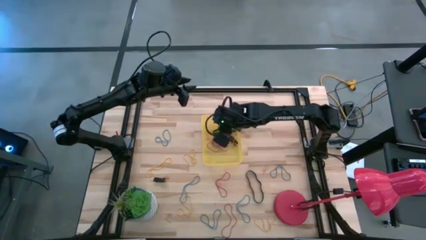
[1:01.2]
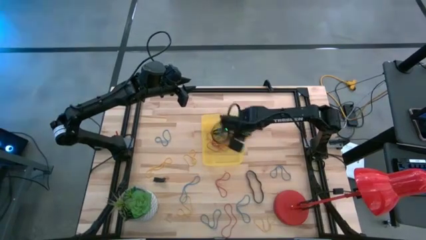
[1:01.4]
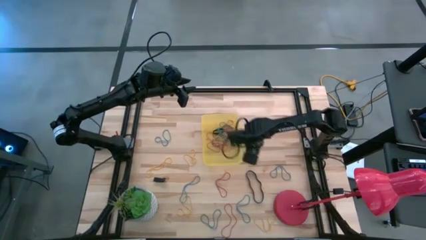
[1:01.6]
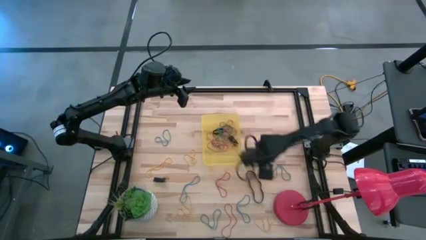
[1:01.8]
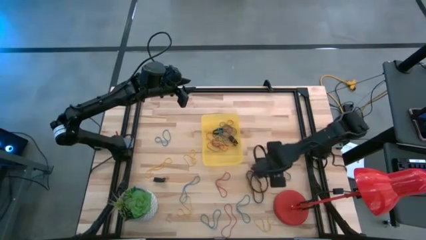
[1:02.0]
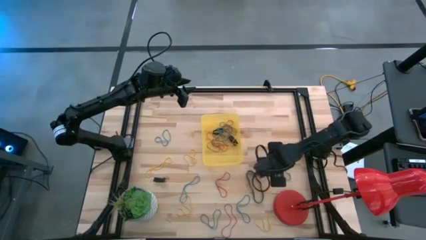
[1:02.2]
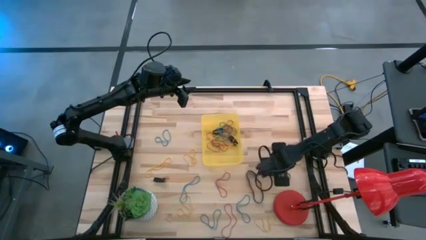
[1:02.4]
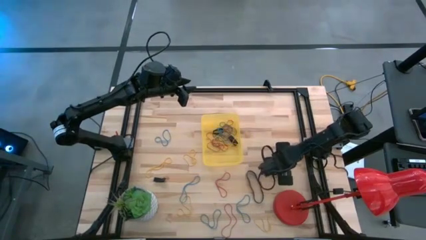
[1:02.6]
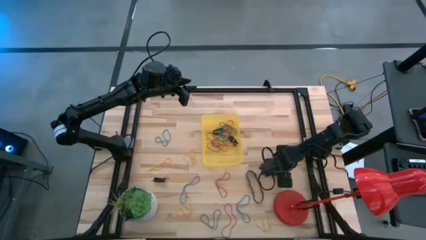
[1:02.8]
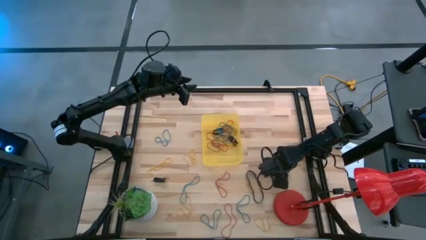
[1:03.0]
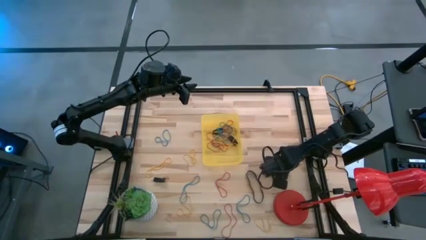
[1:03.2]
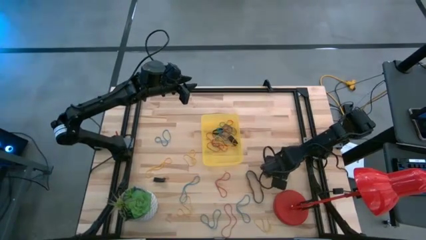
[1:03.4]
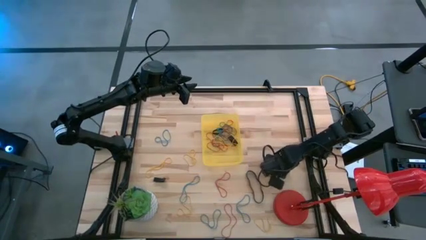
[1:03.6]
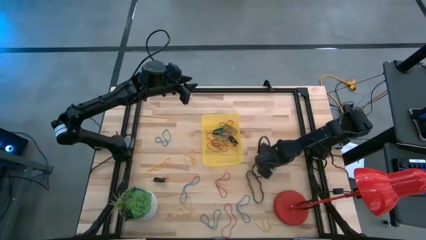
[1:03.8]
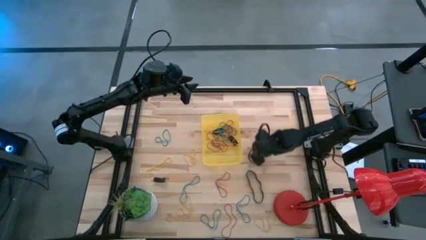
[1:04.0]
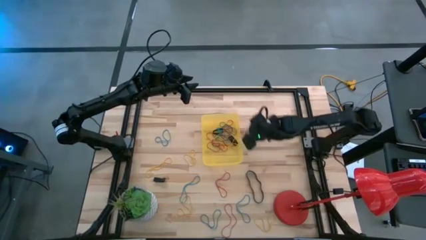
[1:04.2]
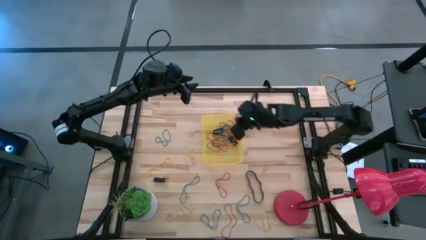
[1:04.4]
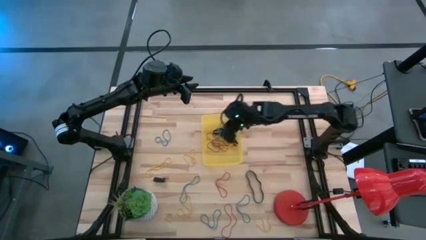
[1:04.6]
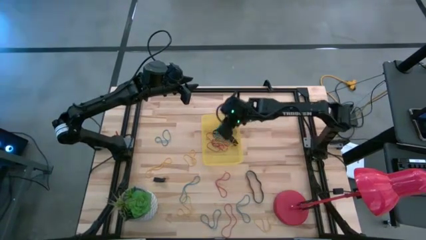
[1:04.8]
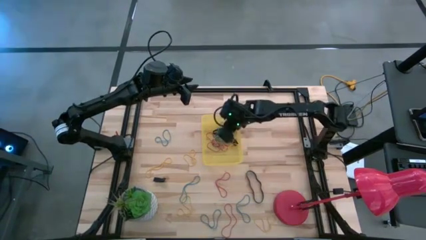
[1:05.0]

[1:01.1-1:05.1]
Task: Pick and place rubber bands into bin
Put the blue rubber band into the yellow bin

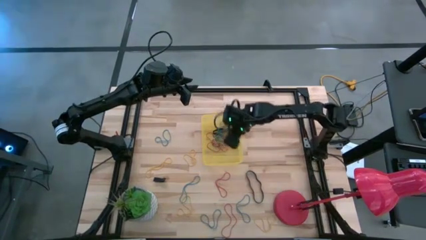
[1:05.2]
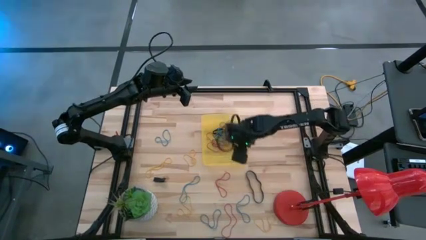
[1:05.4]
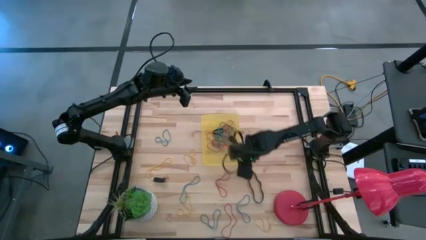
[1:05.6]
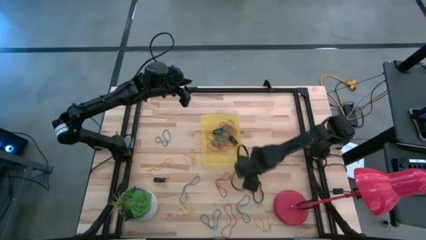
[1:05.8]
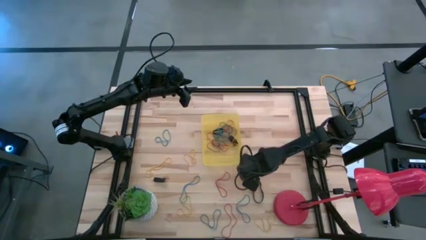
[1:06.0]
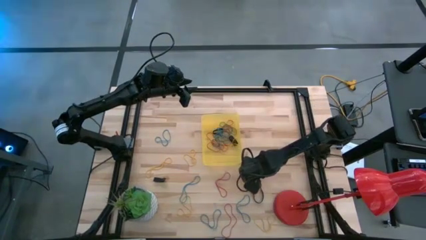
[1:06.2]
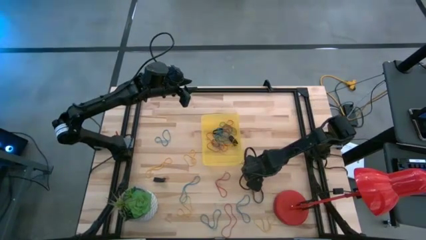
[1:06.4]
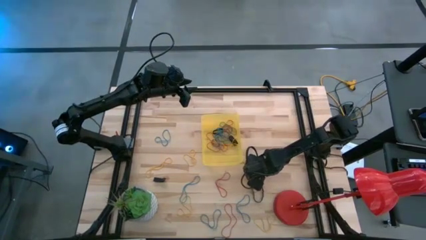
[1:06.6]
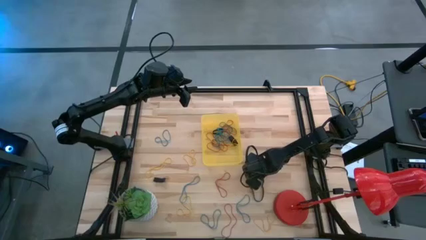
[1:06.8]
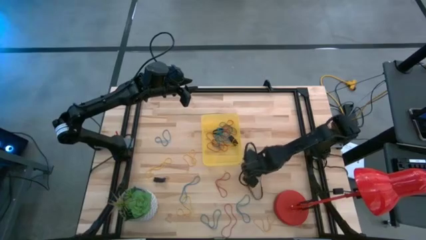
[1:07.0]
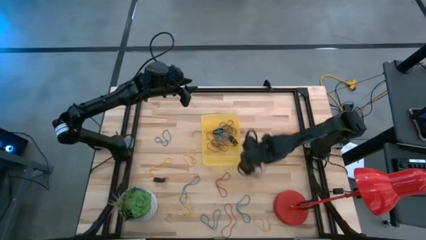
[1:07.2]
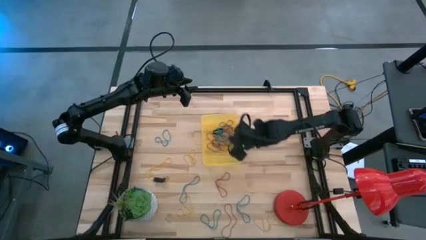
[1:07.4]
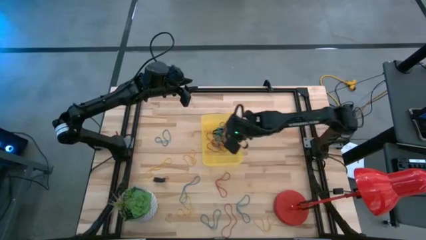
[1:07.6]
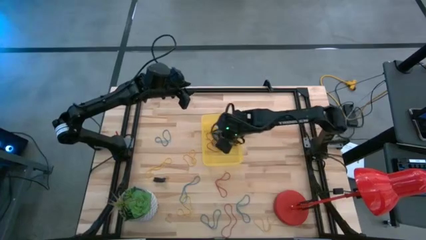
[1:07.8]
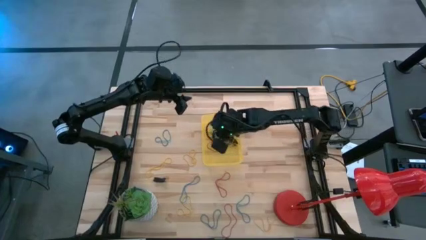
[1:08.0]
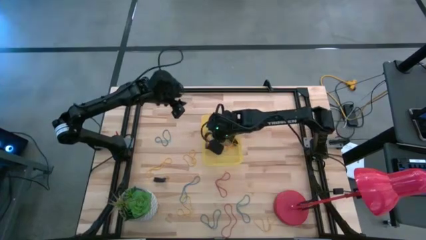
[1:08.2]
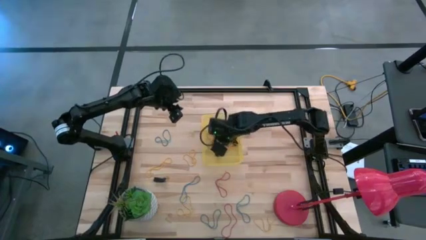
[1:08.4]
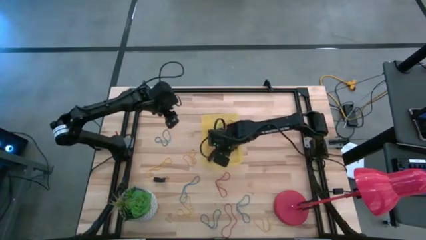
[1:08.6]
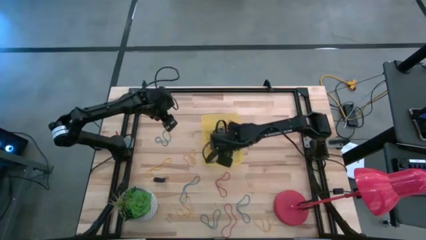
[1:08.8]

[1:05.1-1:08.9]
Put the large black rubber band into the yellow bin

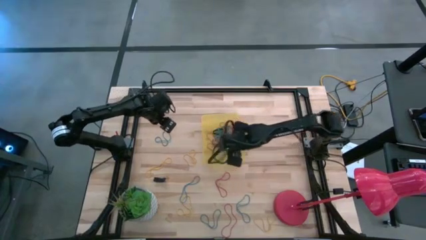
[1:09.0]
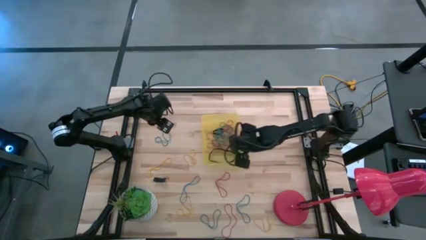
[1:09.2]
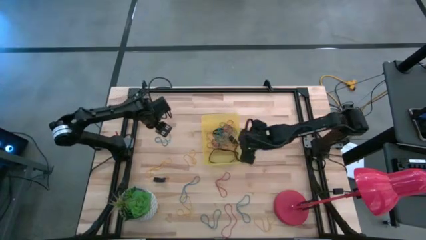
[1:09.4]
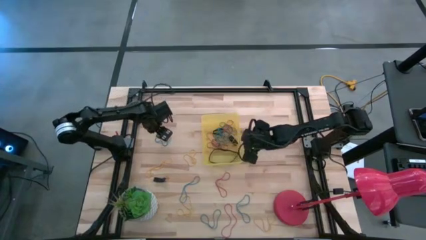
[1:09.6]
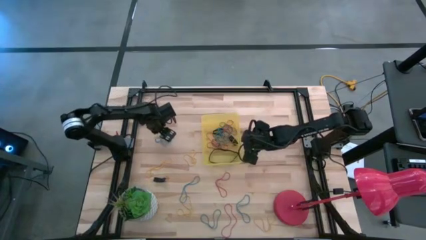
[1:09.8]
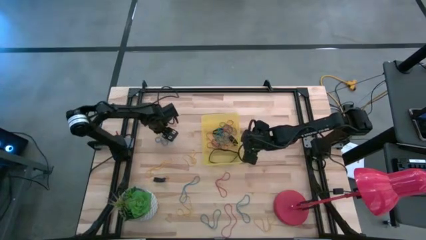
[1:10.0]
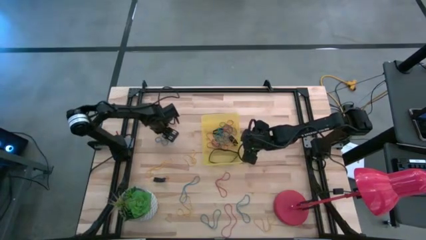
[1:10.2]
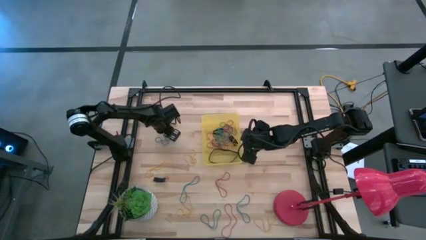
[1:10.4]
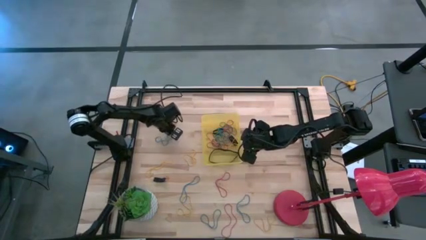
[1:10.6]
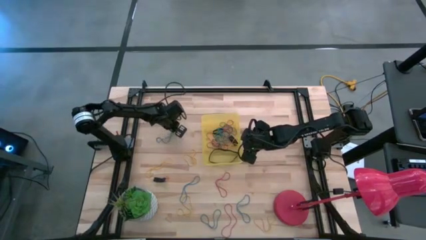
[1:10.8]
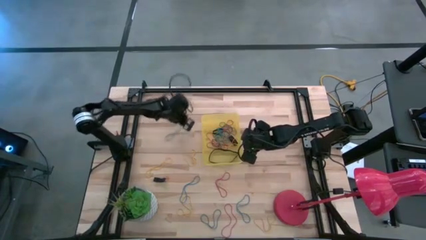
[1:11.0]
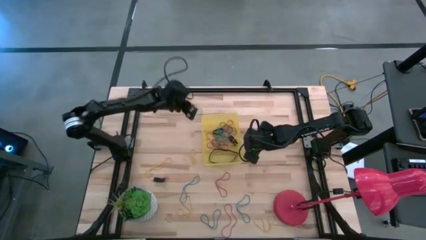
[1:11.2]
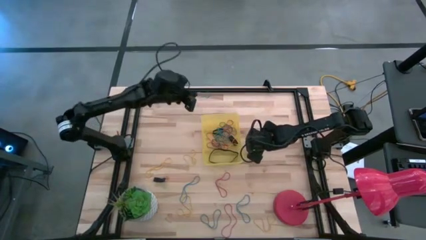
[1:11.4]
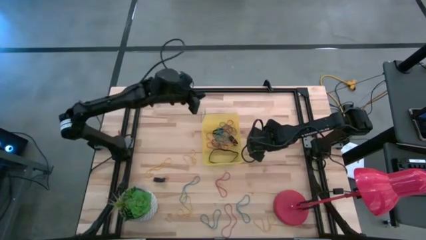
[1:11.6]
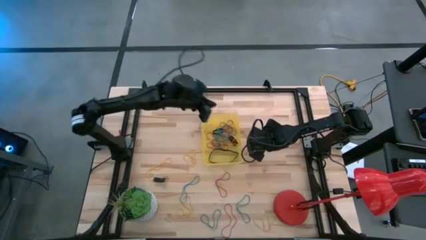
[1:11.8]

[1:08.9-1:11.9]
Put the top left blue rubber band into the yellow bin

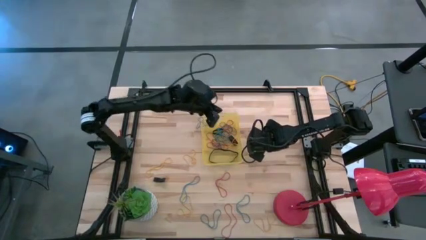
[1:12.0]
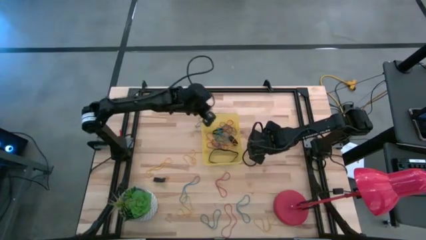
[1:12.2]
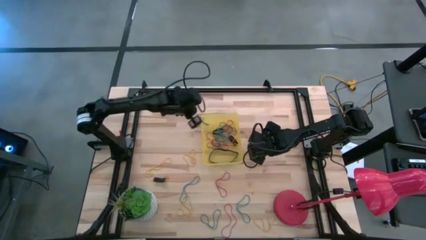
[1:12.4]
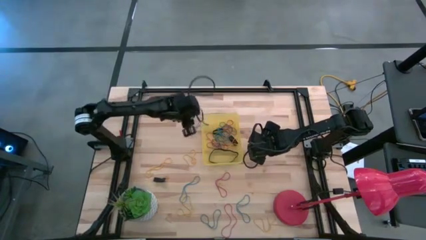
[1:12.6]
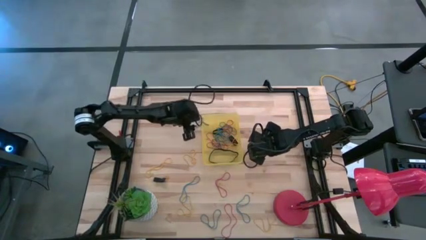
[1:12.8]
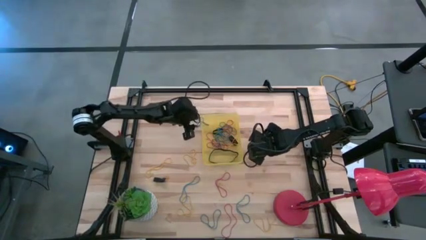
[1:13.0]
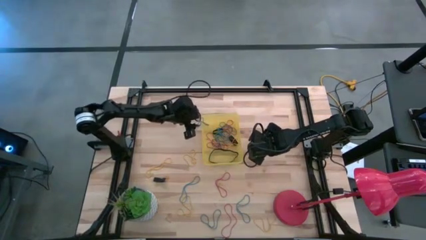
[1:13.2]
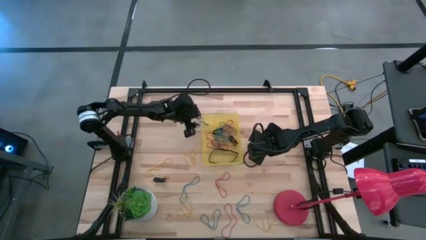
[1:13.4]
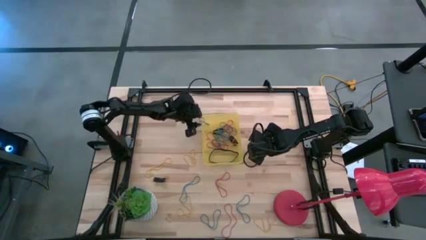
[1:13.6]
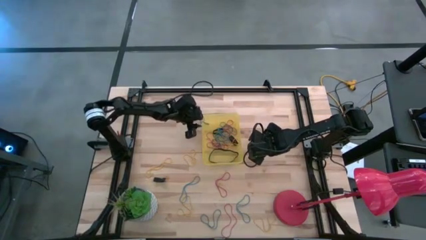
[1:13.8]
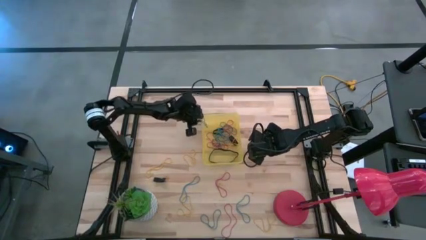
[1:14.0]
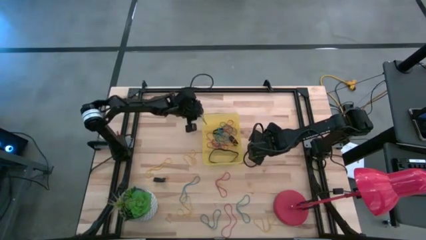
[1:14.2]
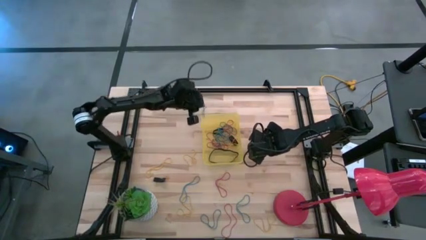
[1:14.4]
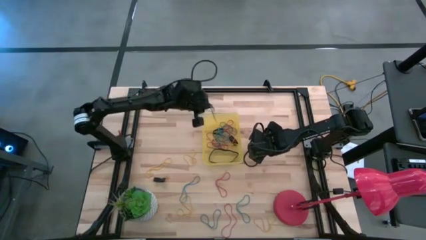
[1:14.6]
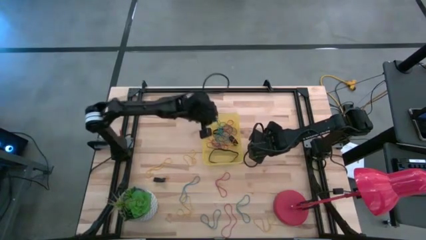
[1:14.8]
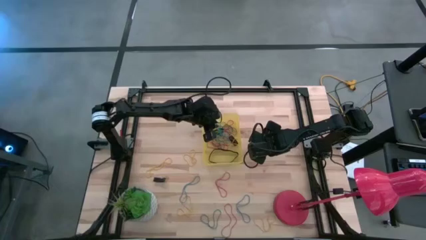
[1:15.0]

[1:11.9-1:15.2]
Put the top left blue rubber band into the yellow bin

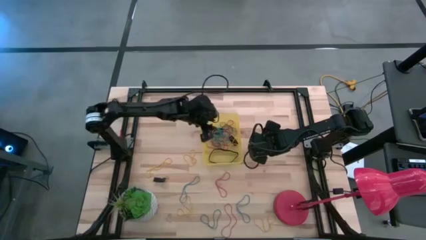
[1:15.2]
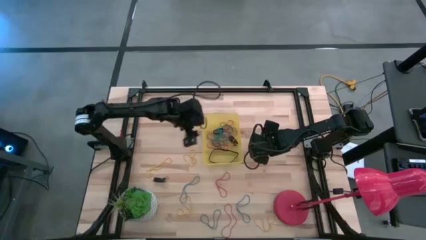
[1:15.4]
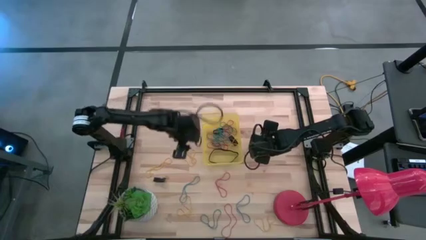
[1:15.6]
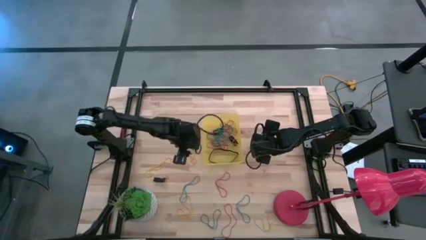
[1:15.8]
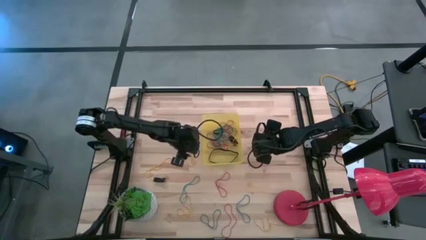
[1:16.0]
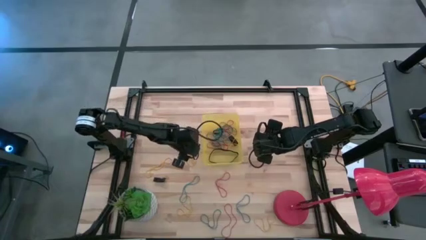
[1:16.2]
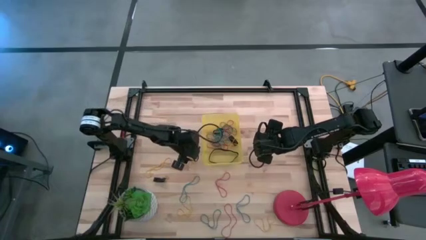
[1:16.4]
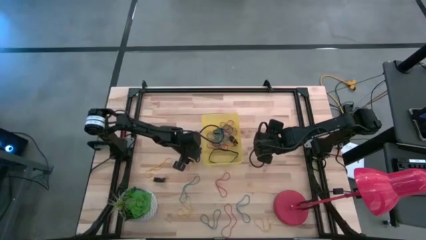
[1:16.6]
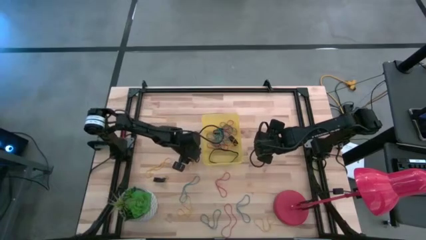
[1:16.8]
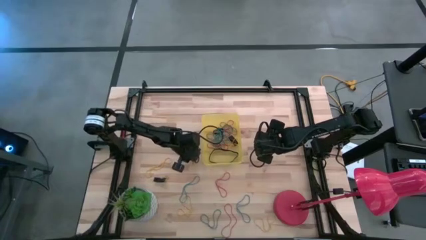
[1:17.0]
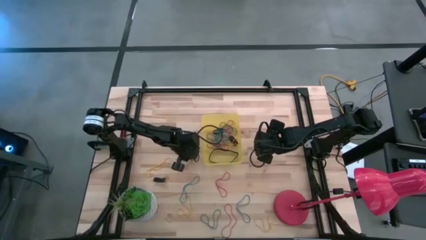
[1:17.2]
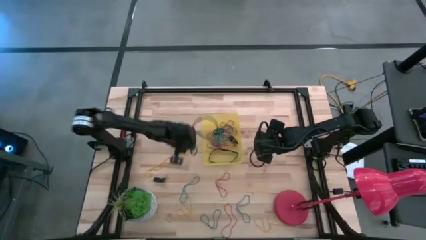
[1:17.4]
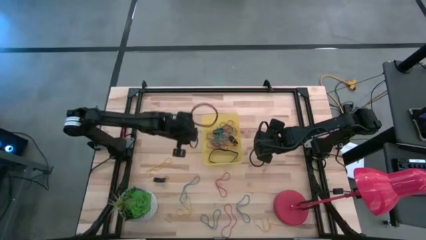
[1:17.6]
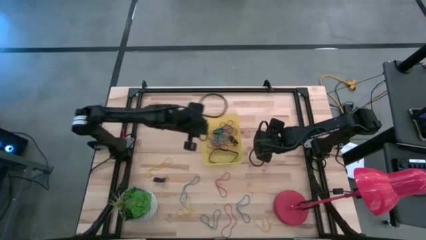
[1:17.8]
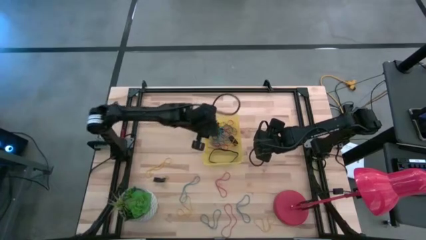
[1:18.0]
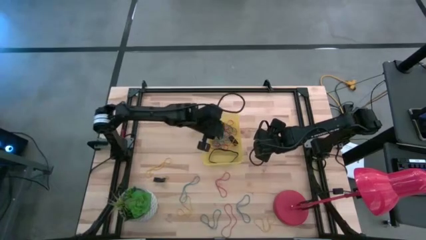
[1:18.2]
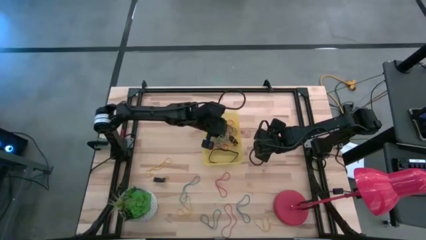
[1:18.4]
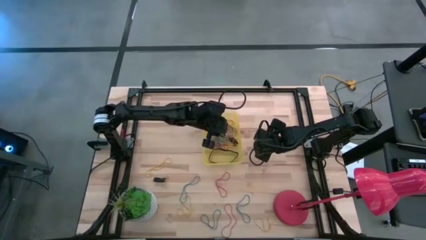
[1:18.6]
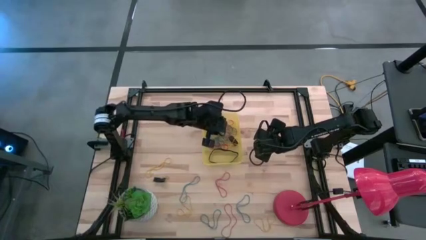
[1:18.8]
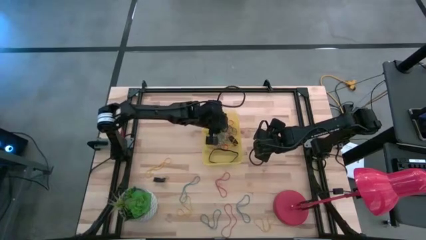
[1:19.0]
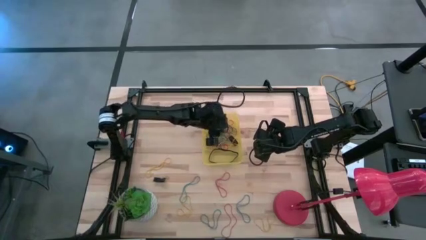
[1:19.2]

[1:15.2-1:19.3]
Put the yellow rubber band into the yellow bin
